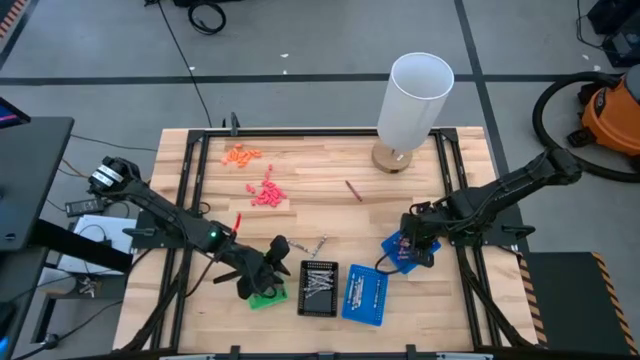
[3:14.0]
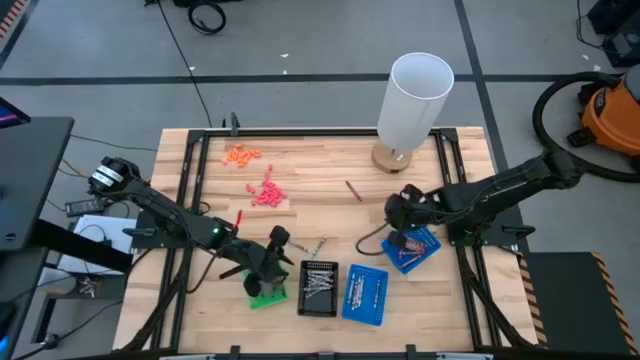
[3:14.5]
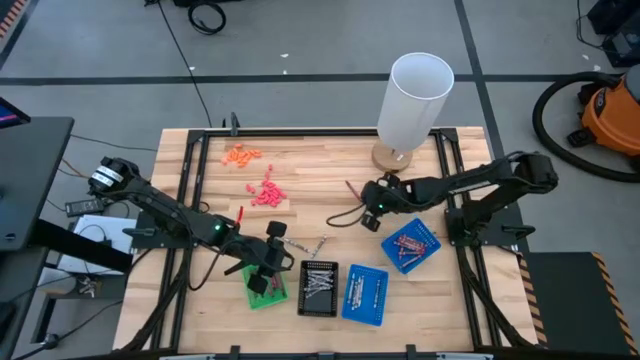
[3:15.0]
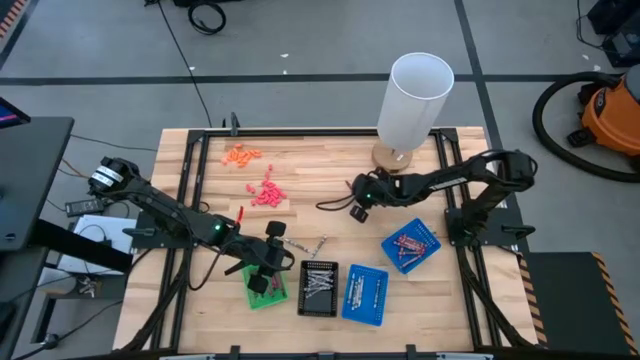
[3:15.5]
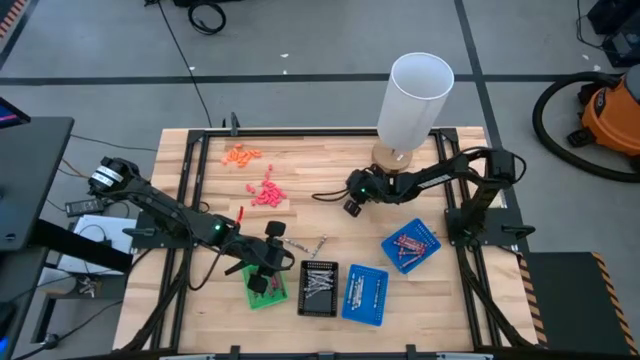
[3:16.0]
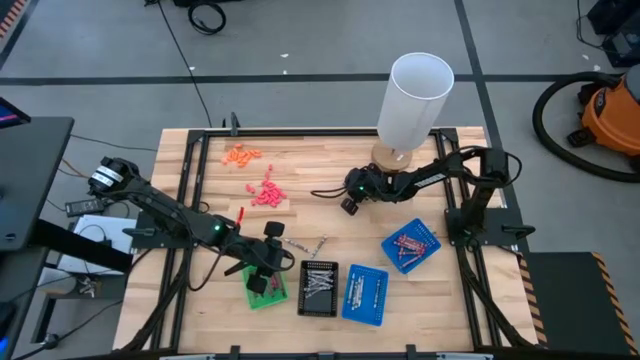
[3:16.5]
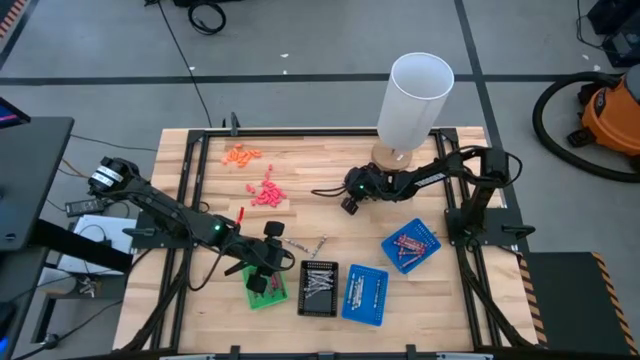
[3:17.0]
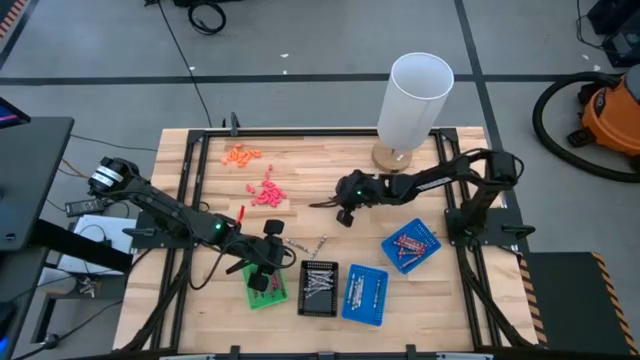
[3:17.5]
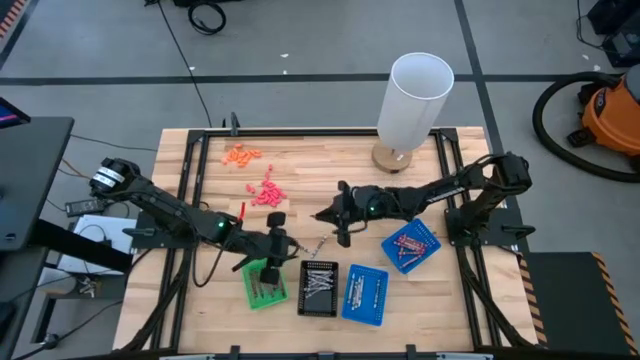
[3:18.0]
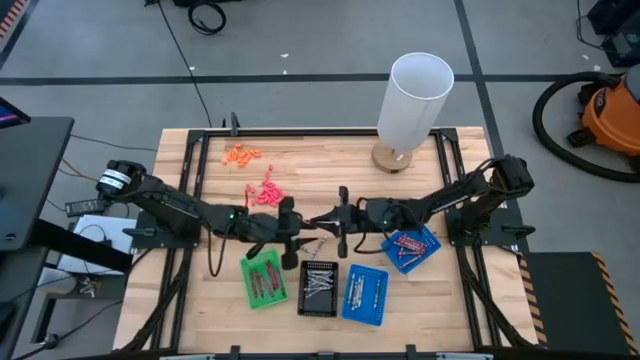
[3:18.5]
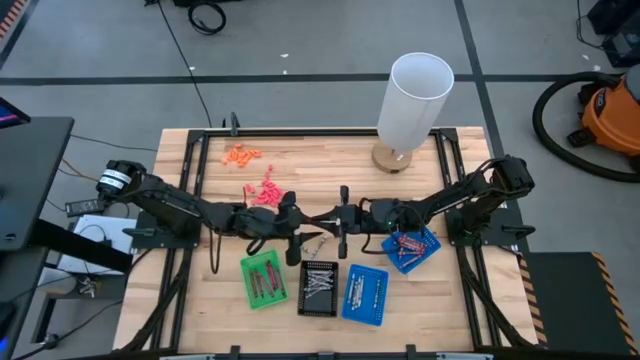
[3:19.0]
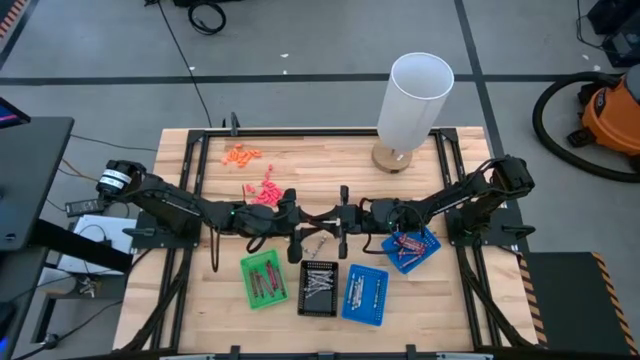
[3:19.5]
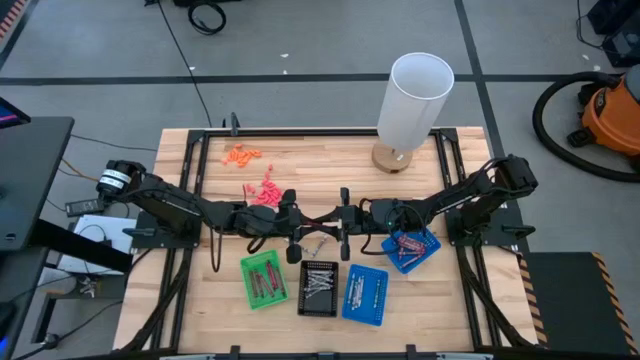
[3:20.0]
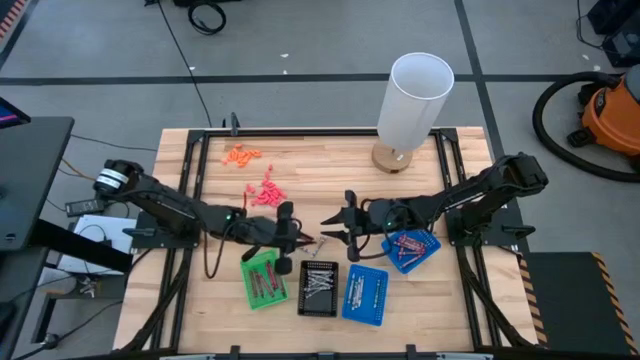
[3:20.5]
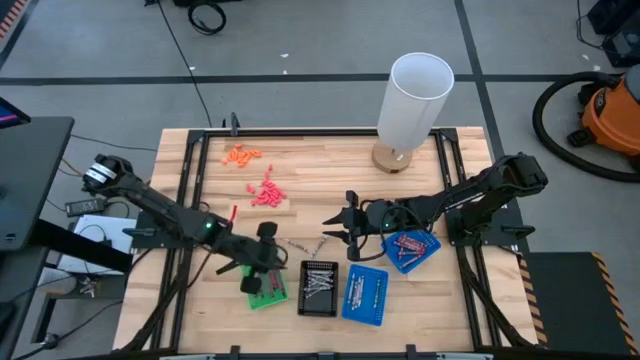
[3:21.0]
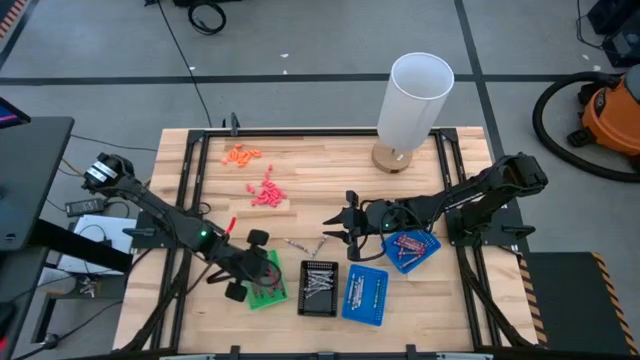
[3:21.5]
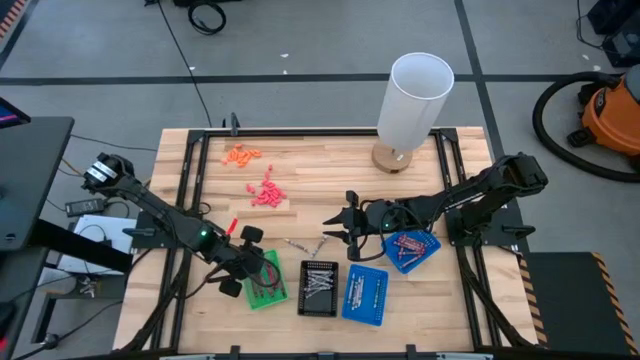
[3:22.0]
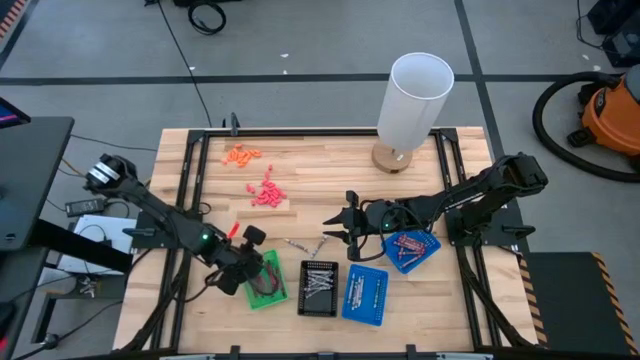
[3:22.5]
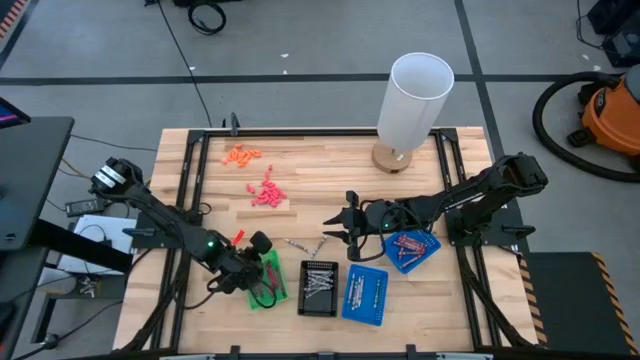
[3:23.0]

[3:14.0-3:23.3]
Task: Sort crayons
Put the red crayon into the green basket

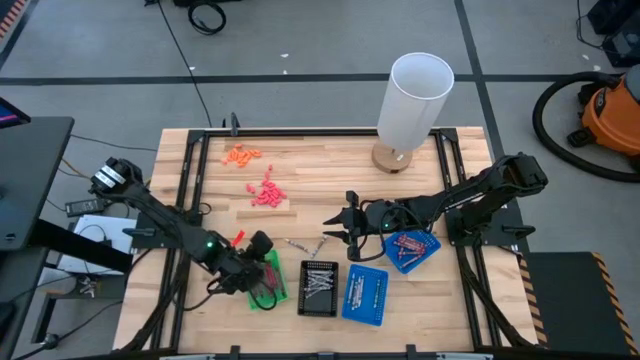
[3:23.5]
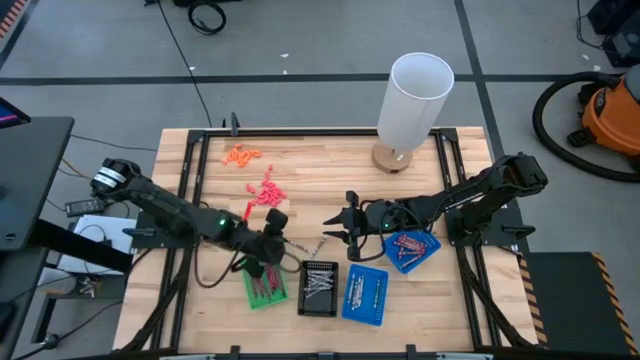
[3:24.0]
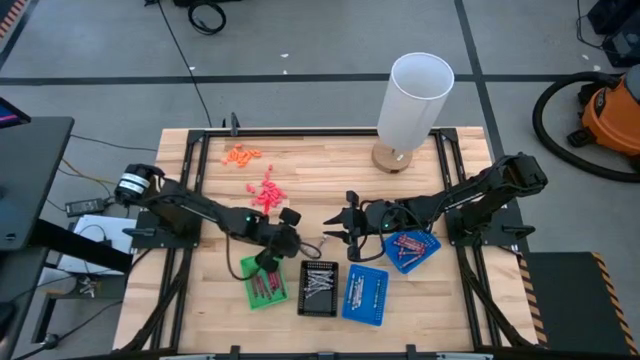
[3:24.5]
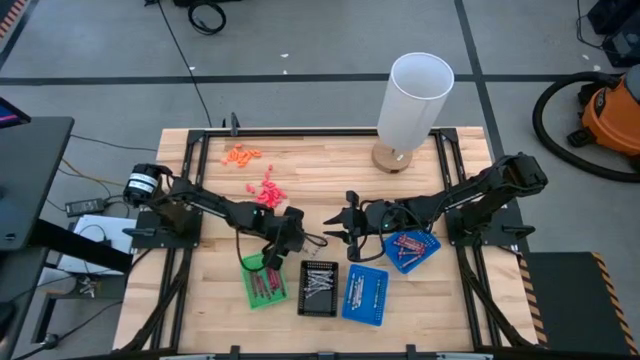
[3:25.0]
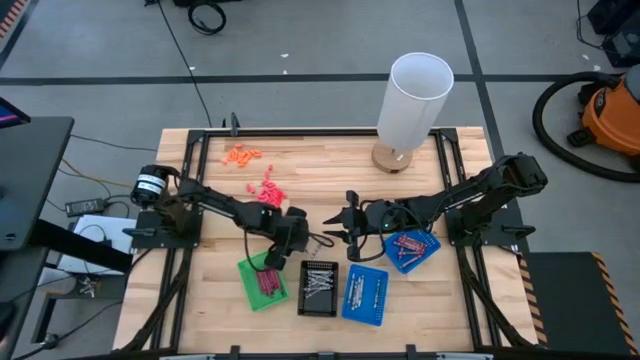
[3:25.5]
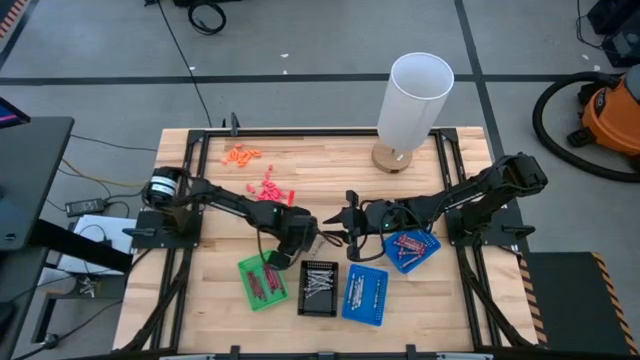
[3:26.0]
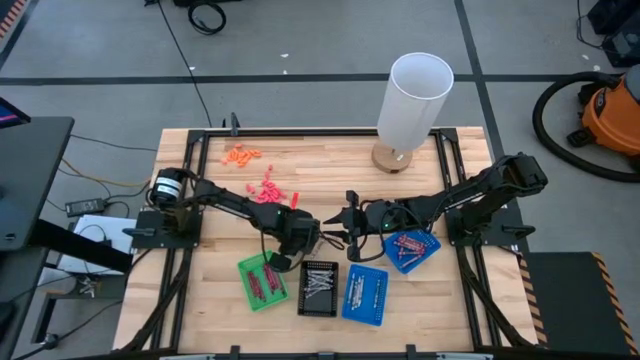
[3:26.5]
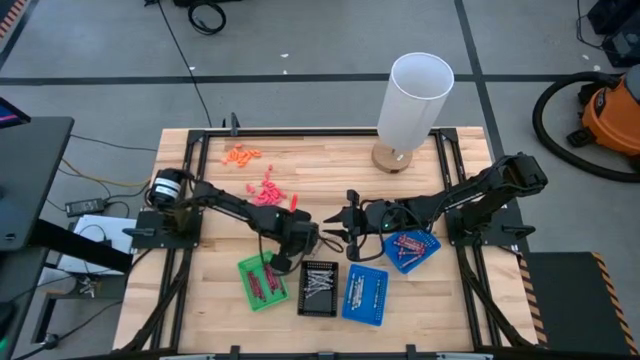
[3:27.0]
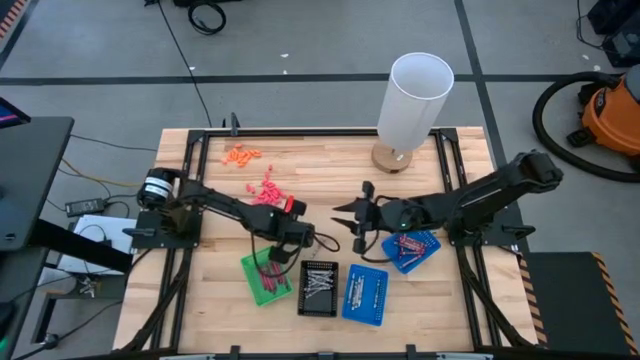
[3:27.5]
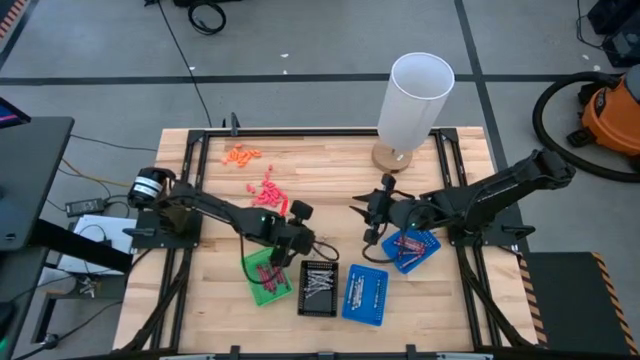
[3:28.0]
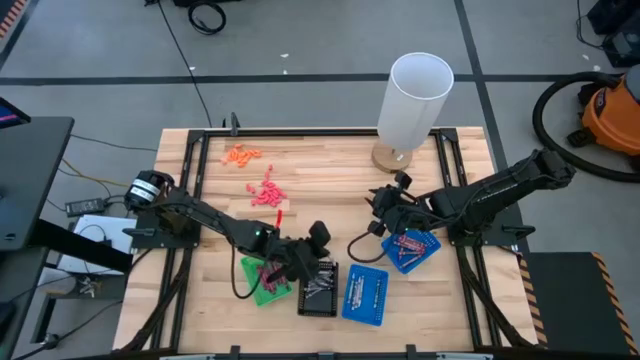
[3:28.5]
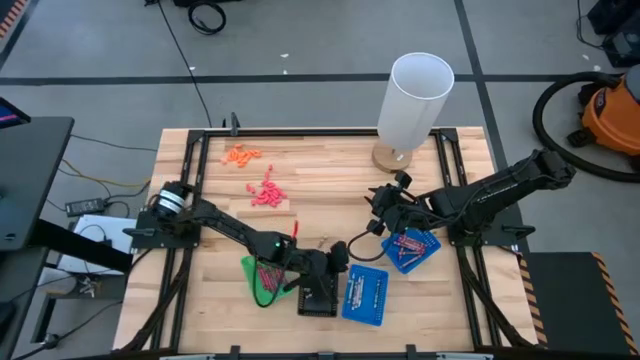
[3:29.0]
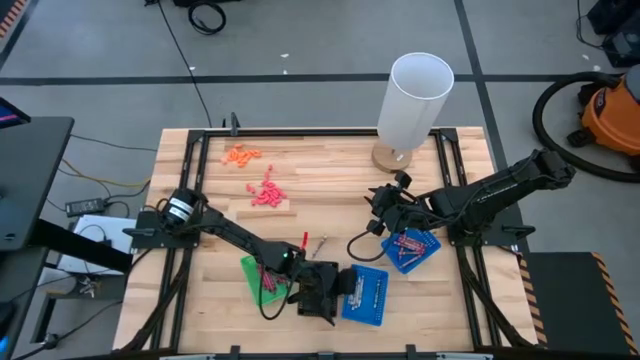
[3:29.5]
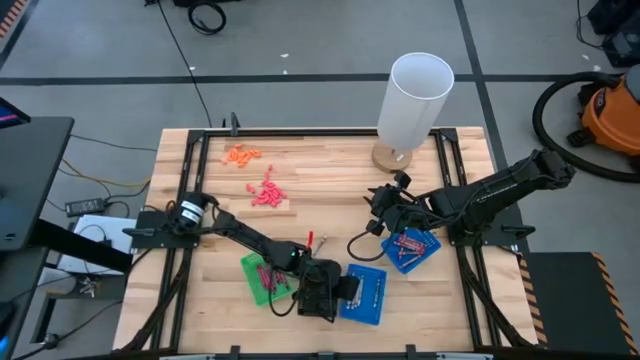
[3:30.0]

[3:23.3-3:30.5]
Put the white crayon into the left blue basket

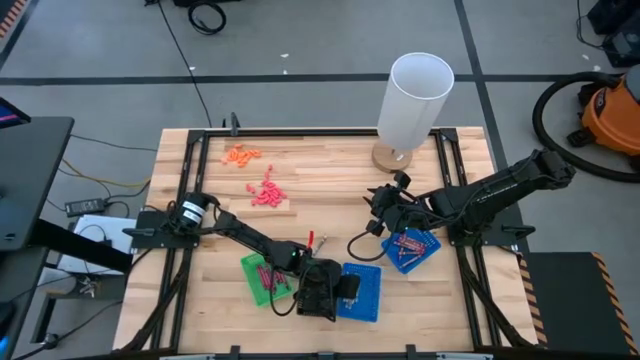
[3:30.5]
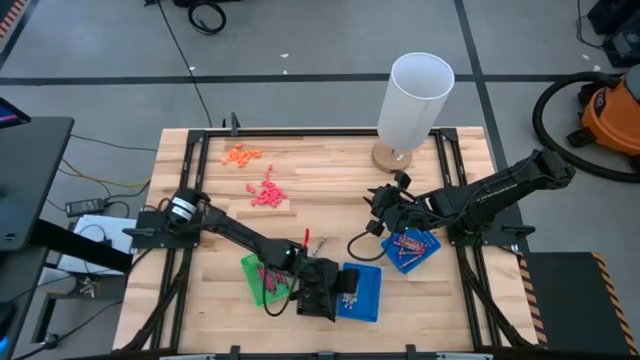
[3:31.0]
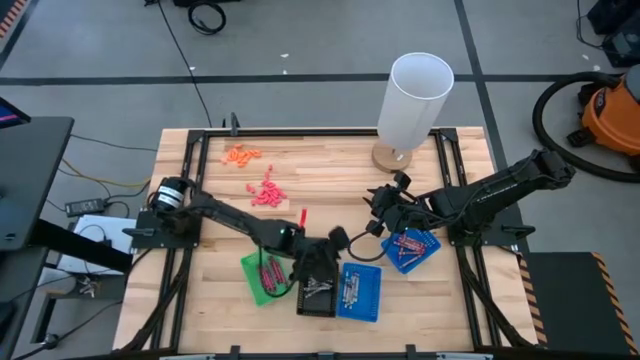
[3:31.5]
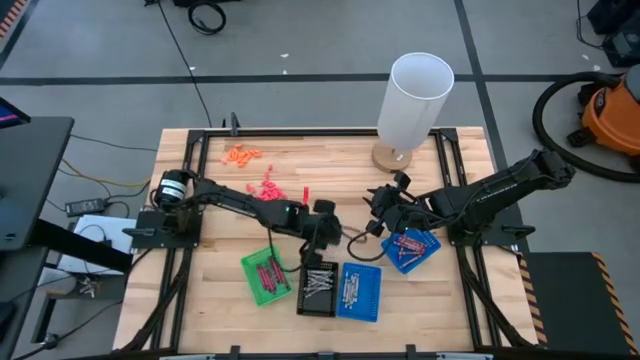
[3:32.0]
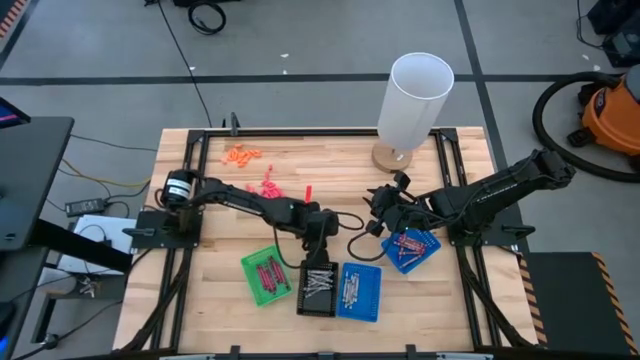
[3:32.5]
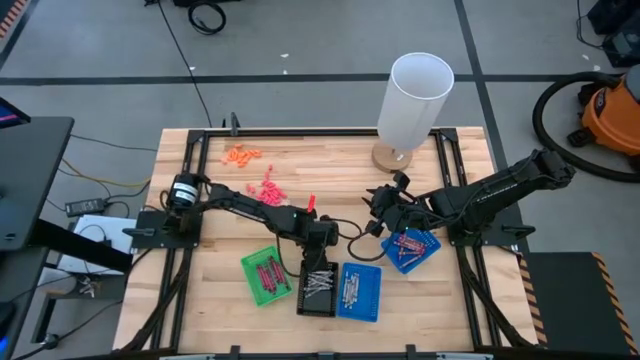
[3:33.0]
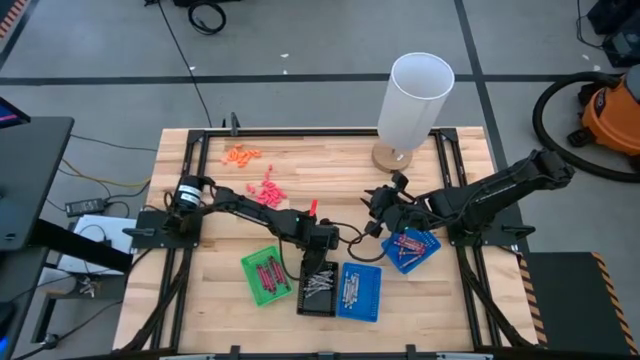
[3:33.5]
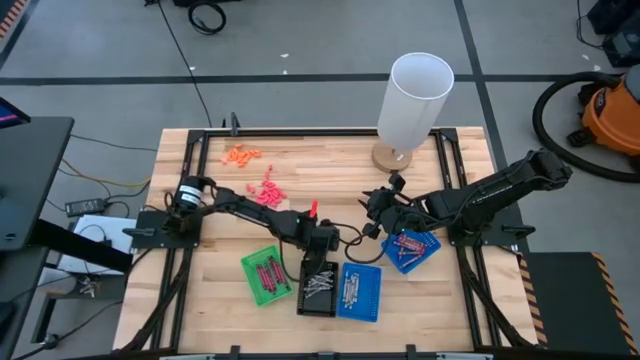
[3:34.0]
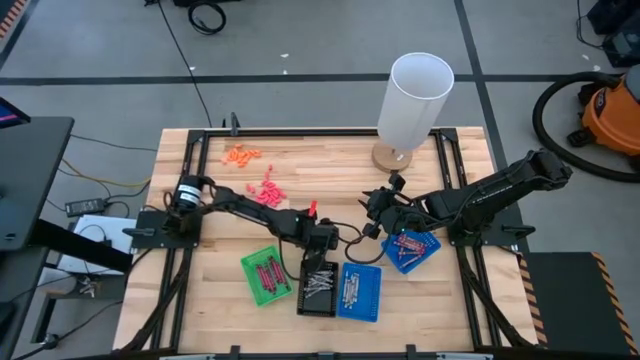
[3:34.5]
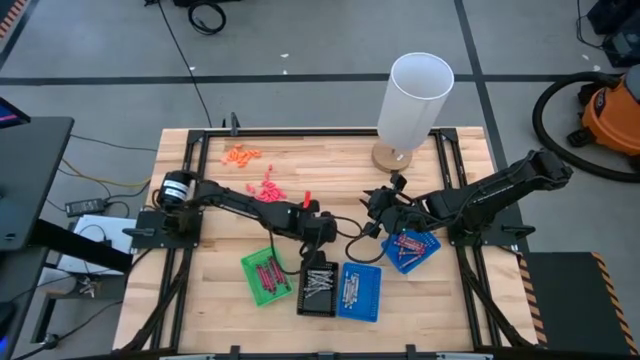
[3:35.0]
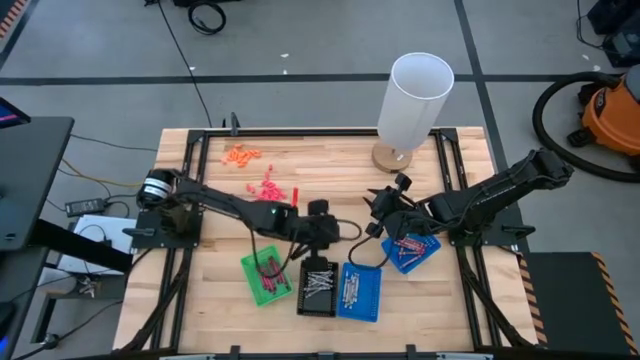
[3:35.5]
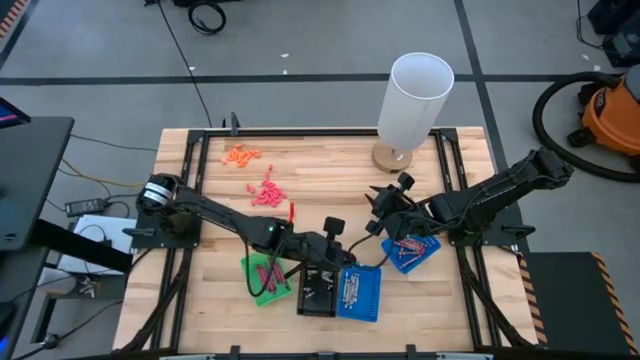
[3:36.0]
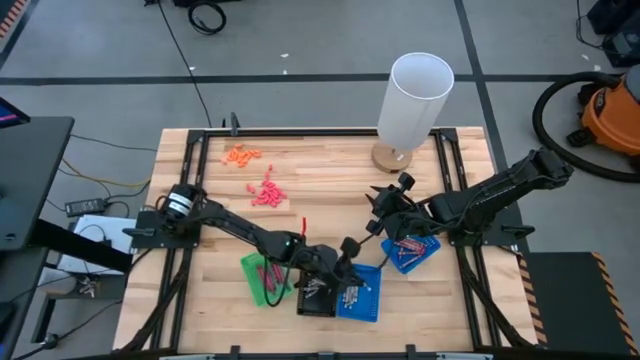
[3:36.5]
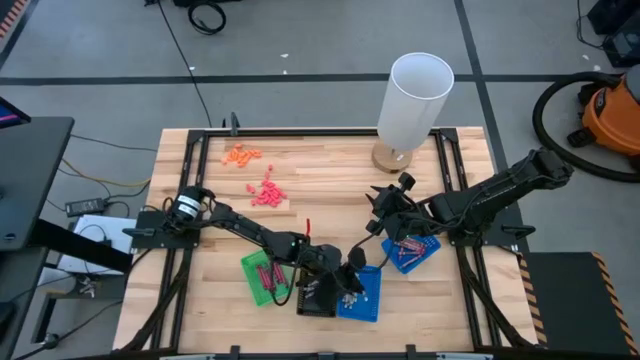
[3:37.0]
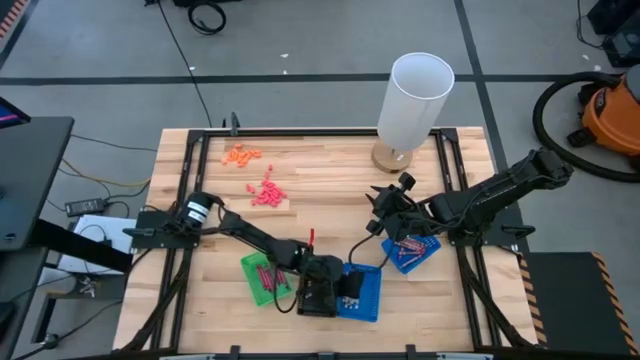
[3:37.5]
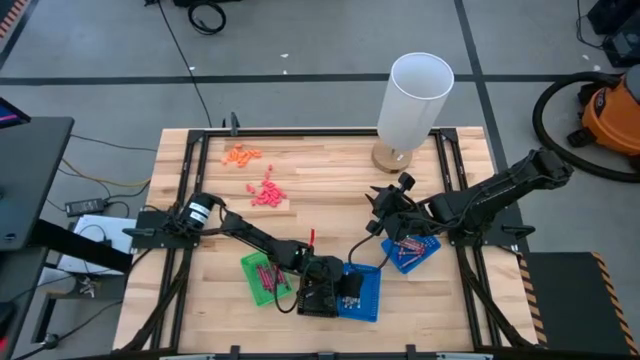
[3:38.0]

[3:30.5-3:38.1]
Put the white crayon into the left blue basket
